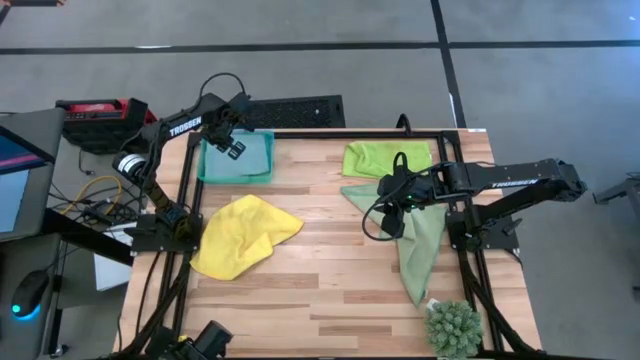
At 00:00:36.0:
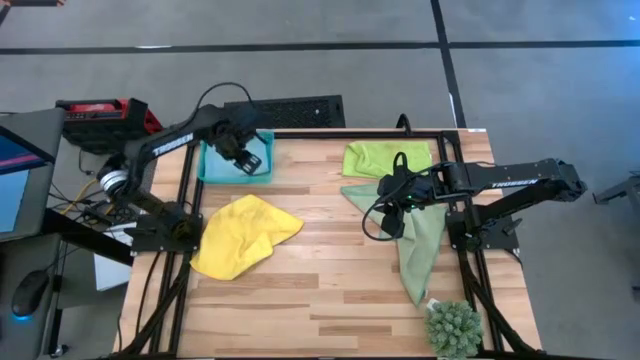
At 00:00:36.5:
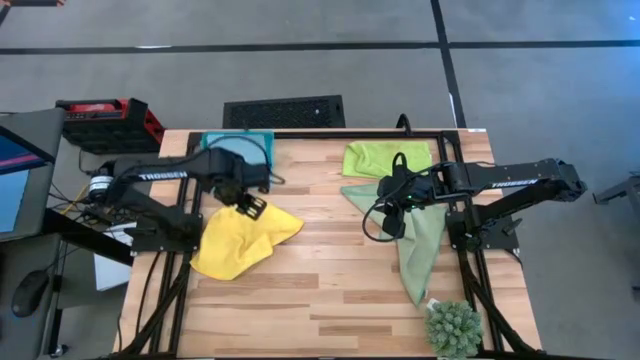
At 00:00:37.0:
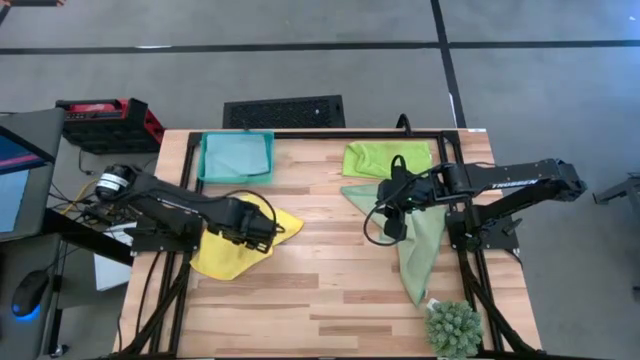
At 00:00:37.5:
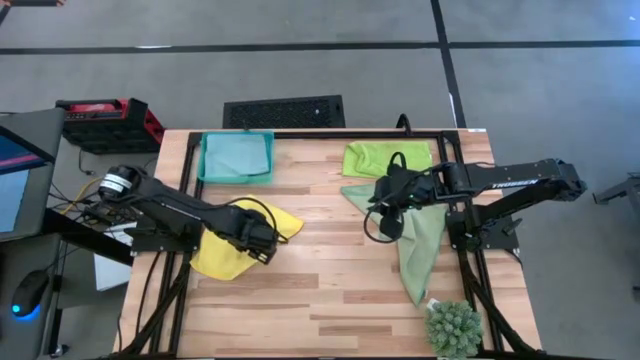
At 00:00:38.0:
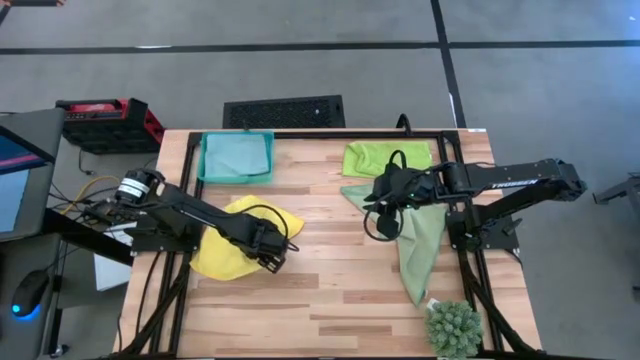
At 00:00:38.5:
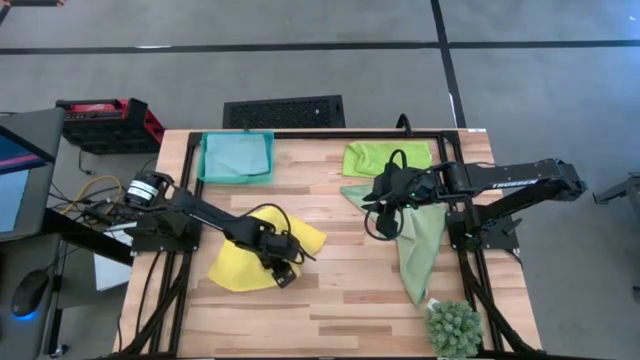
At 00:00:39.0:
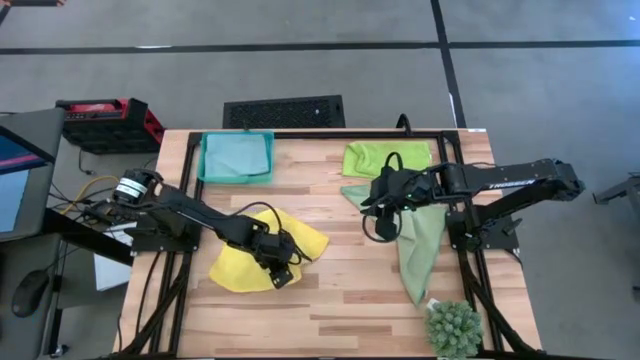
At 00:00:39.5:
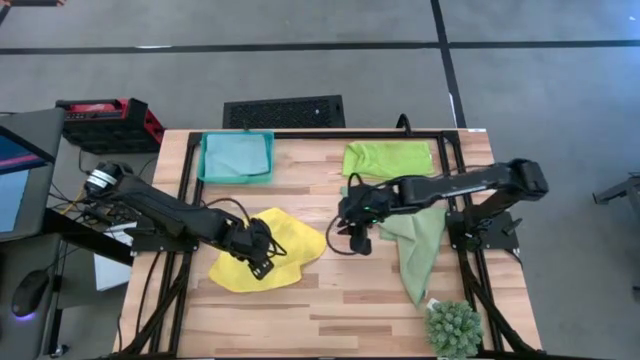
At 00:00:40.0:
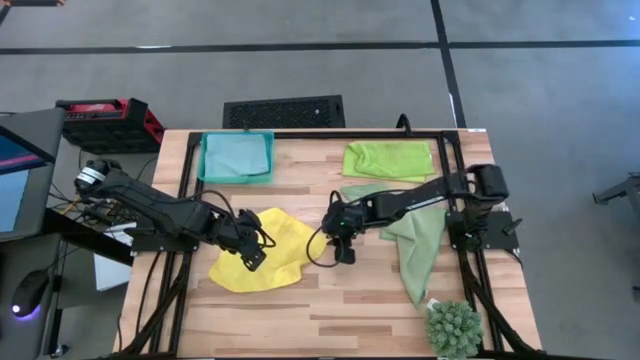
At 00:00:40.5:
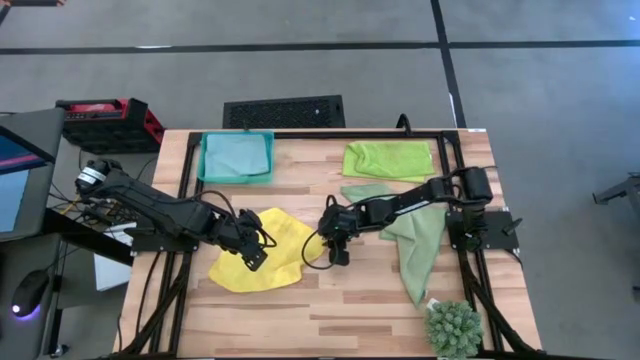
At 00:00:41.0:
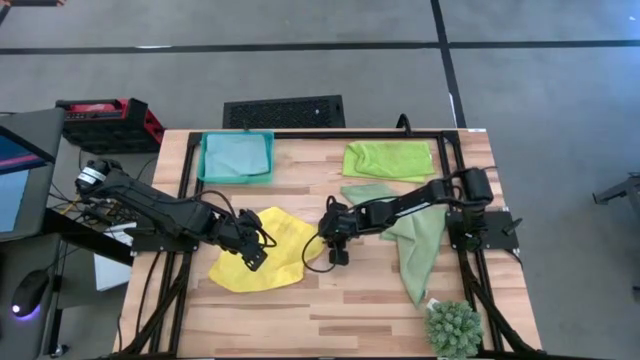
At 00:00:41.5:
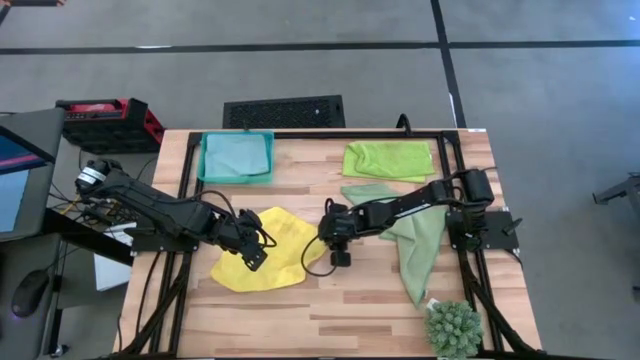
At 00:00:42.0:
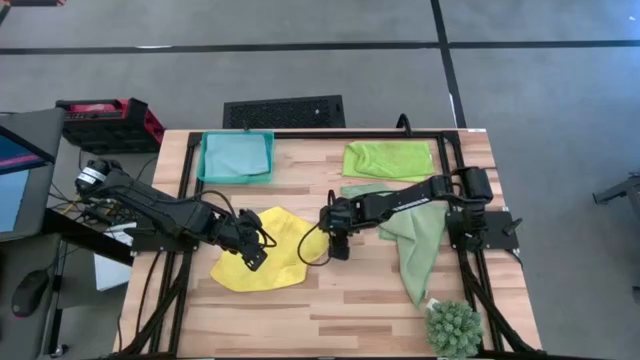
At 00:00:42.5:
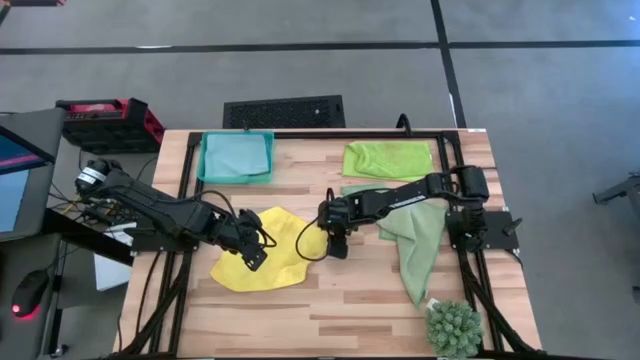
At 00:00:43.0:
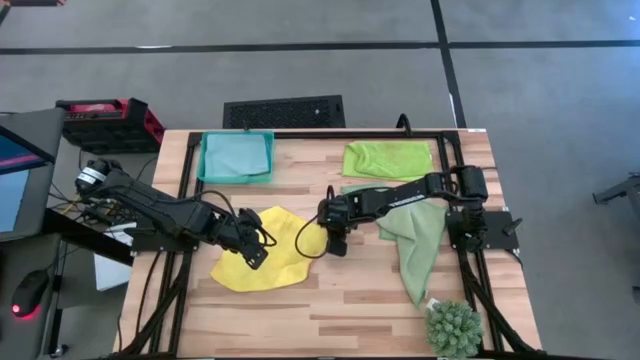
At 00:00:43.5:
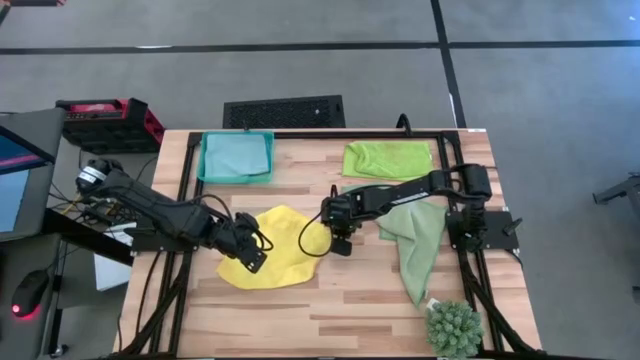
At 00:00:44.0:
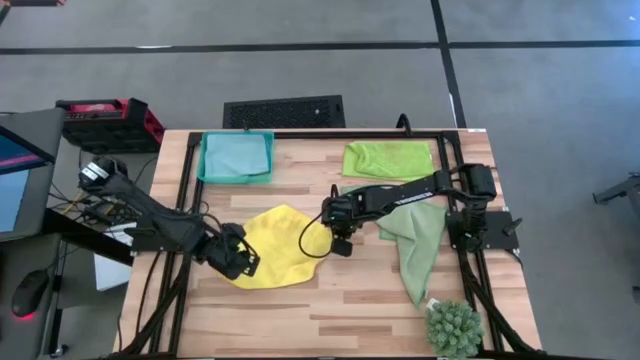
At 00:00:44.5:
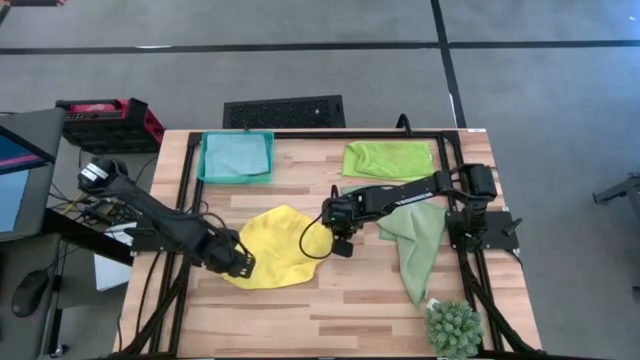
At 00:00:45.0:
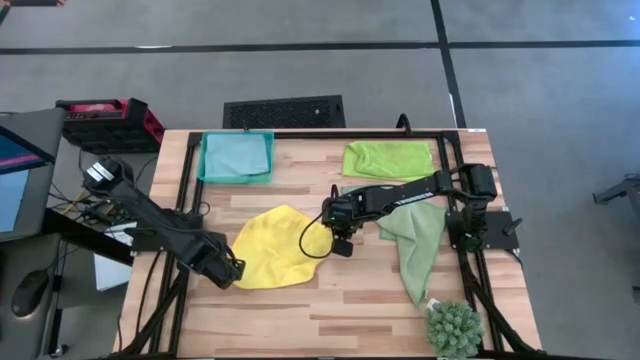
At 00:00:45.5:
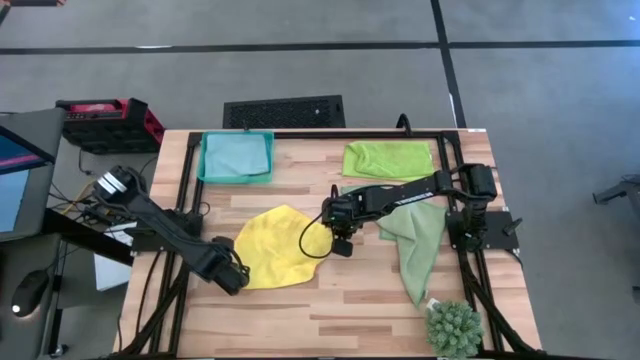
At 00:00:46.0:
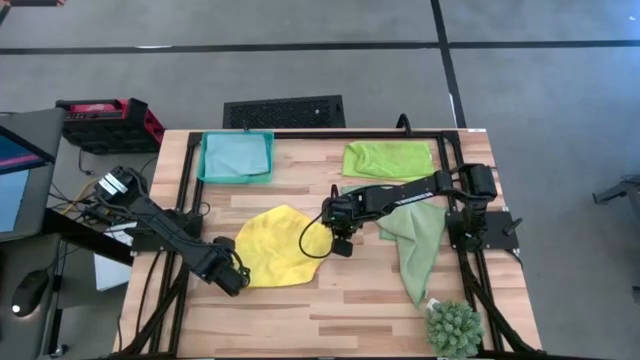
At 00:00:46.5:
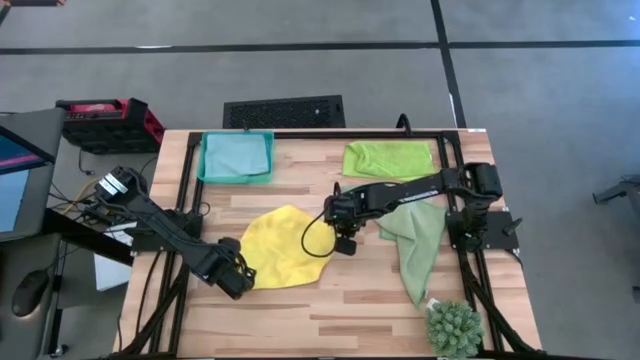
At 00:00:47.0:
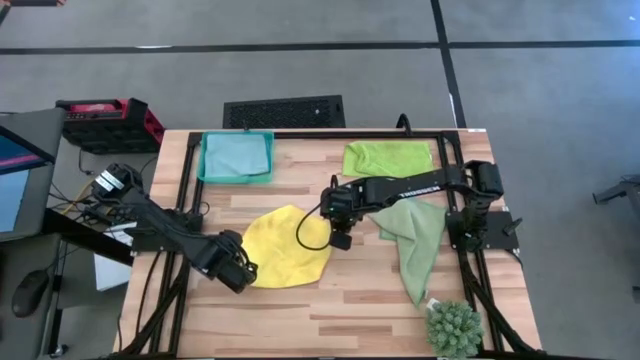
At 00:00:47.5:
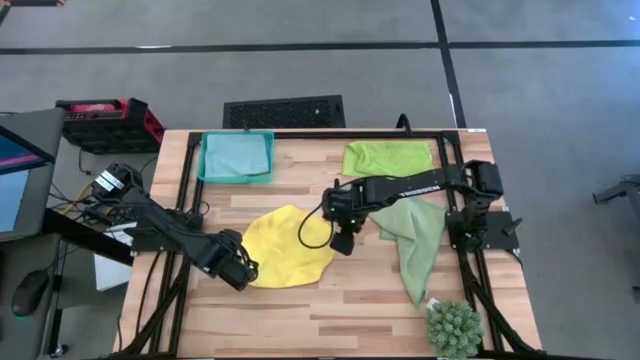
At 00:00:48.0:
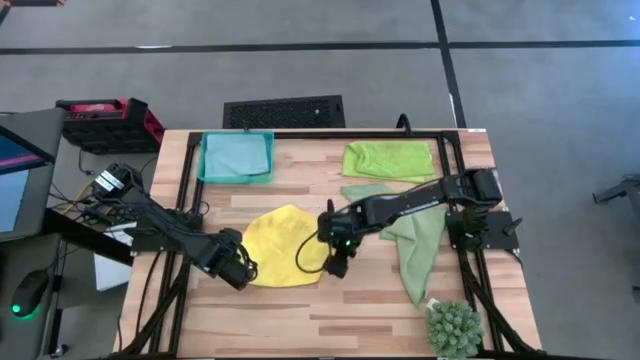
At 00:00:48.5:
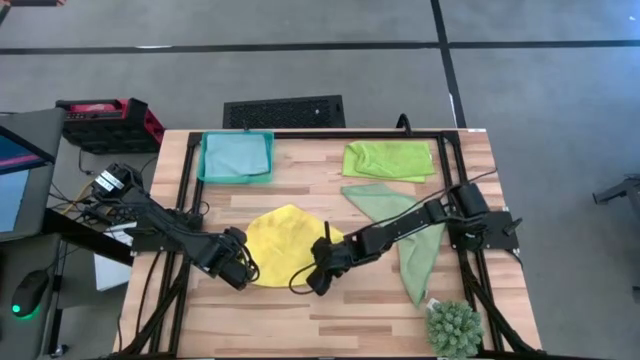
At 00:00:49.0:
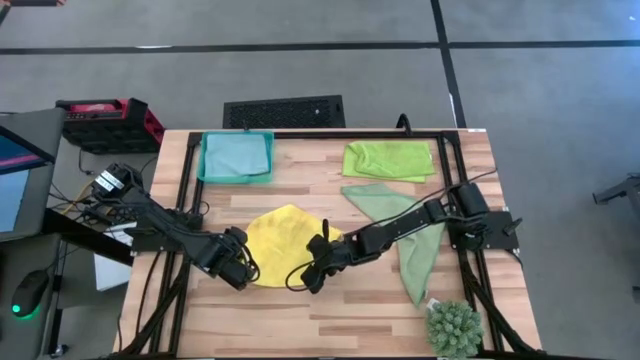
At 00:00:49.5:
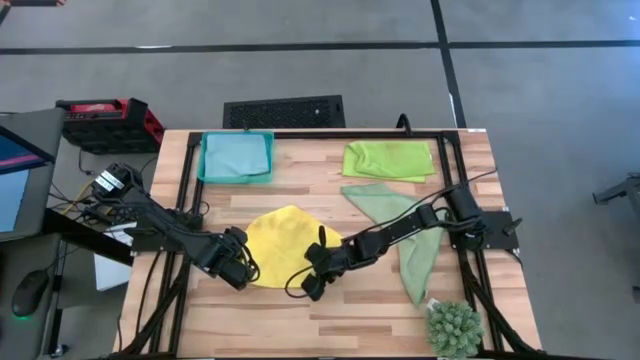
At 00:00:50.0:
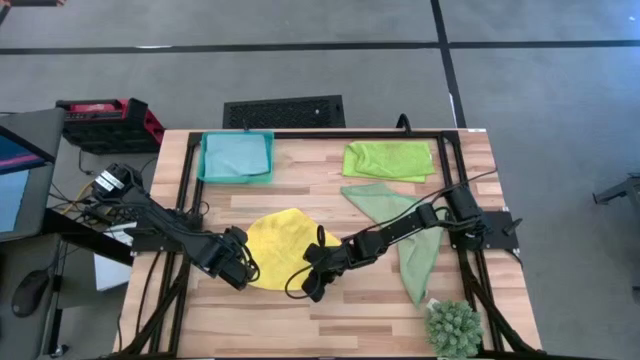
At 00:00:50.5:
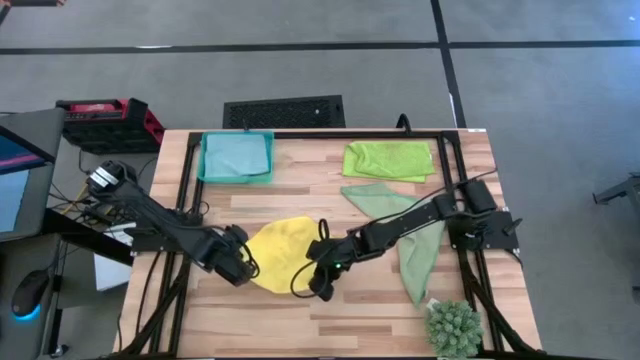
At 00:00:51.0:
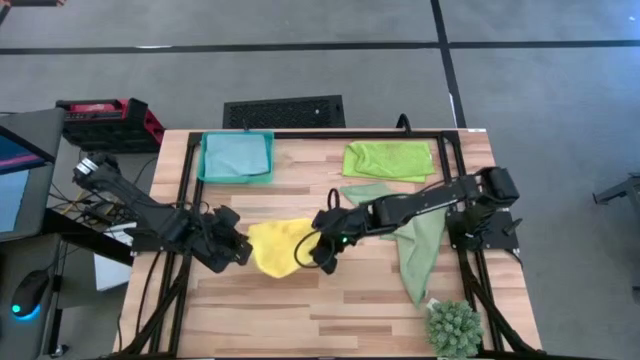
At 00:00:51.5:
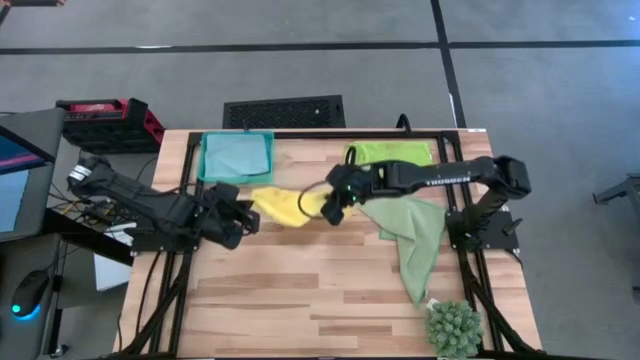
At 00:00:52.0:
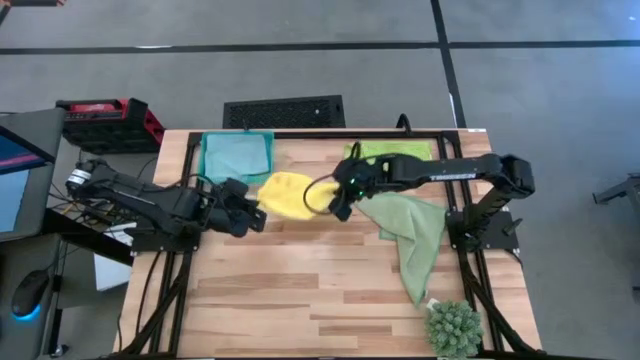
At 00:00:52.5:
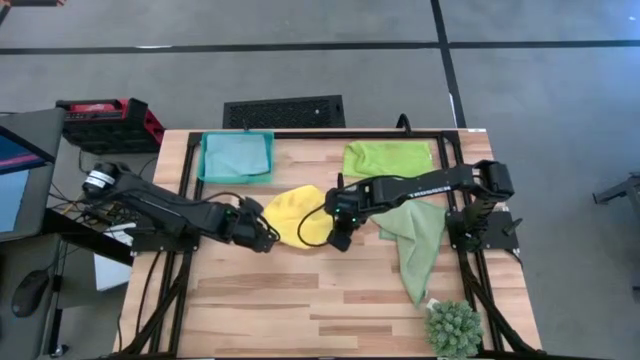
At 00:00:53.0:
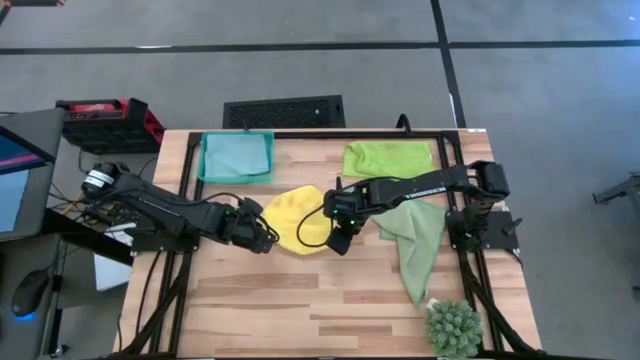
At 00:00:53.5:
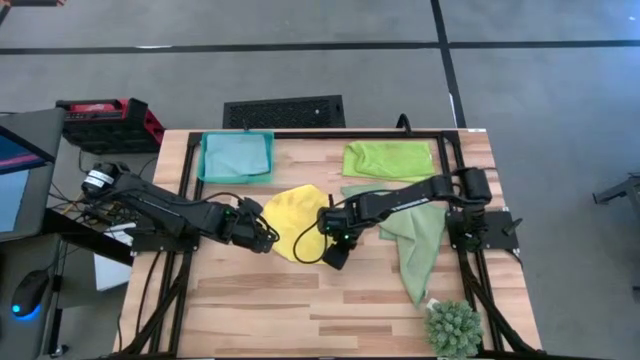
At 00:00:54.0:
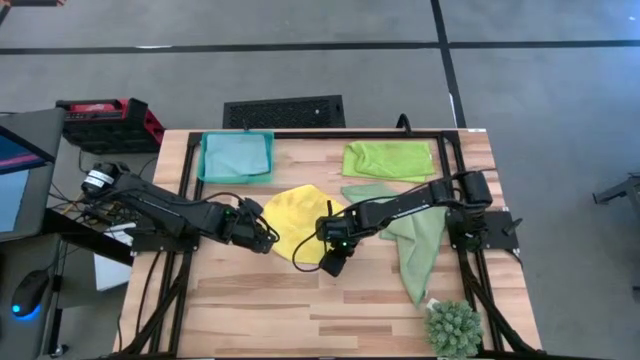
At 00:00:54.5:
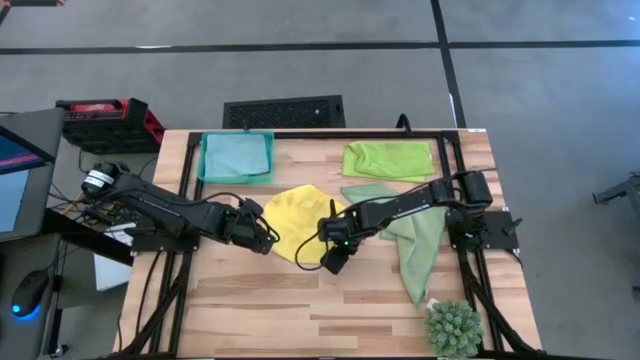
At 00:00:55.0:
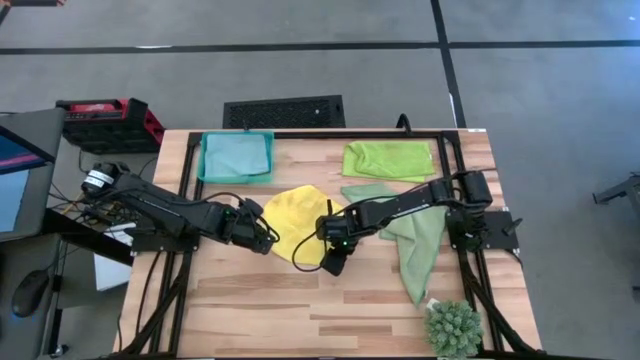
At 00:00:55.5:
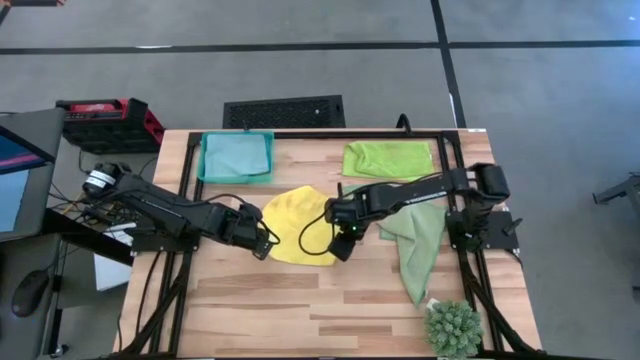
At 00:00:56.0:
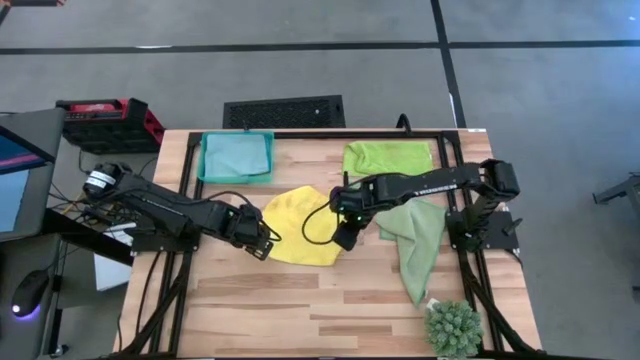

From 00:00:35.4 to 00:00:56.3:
Task: Fold microfiber towels
Fold the yellow microfiber towel
